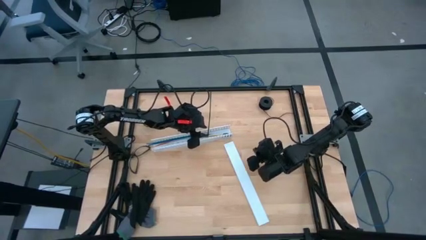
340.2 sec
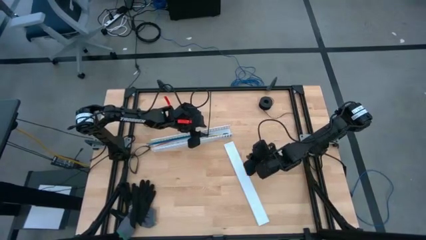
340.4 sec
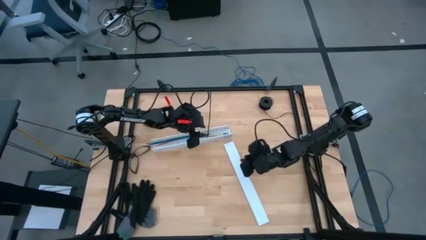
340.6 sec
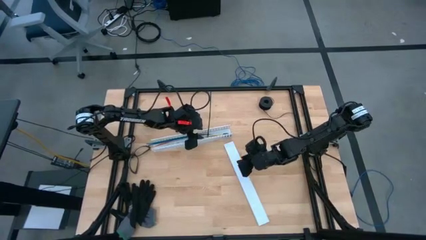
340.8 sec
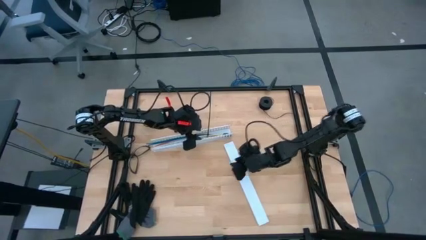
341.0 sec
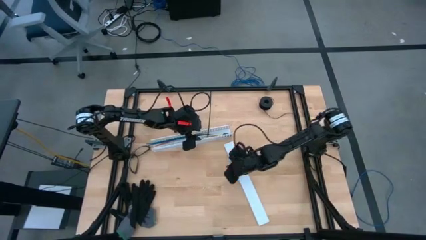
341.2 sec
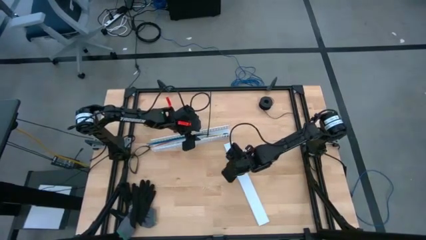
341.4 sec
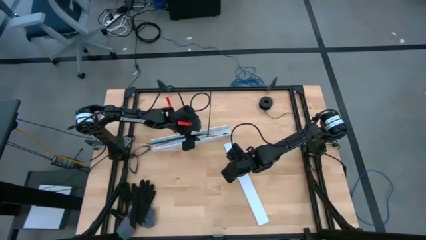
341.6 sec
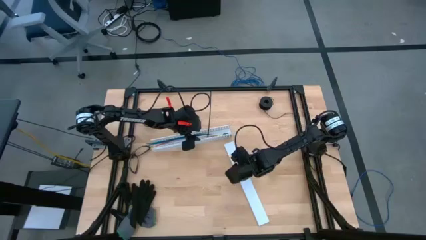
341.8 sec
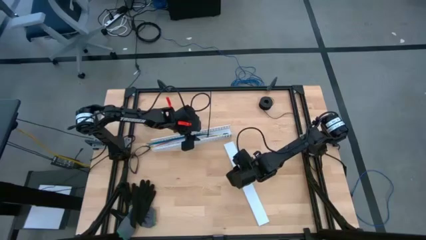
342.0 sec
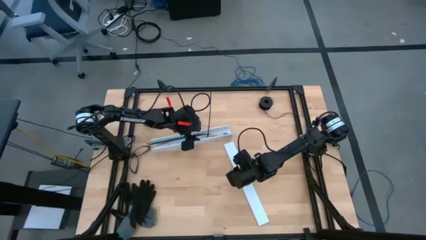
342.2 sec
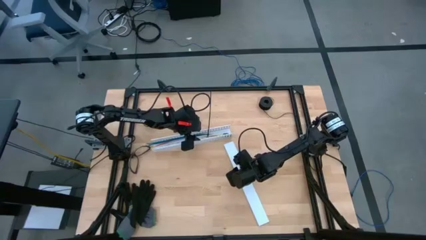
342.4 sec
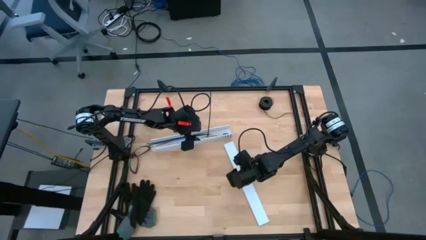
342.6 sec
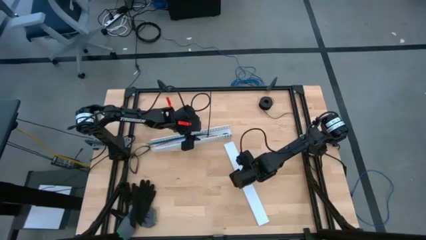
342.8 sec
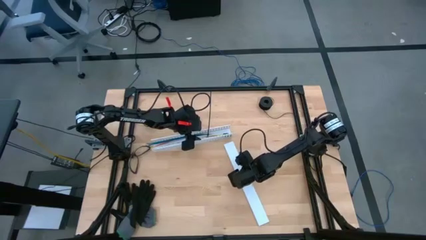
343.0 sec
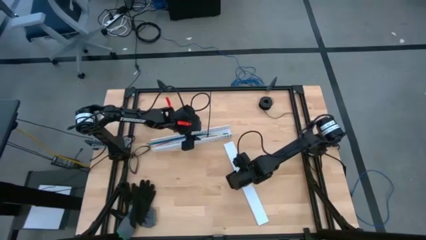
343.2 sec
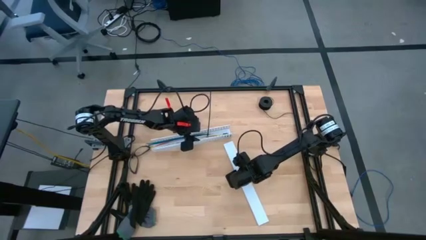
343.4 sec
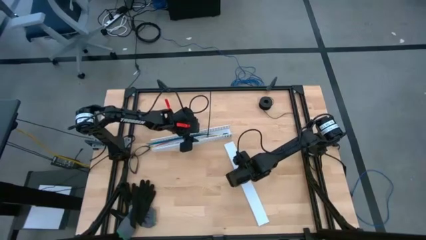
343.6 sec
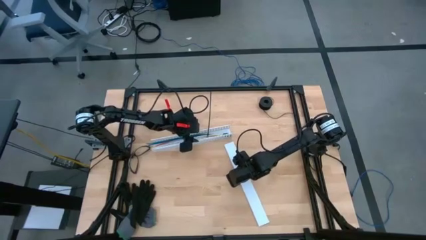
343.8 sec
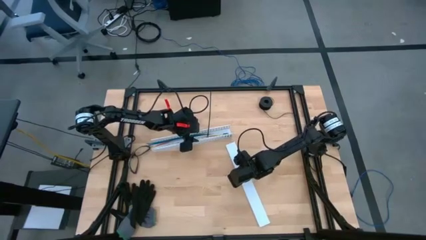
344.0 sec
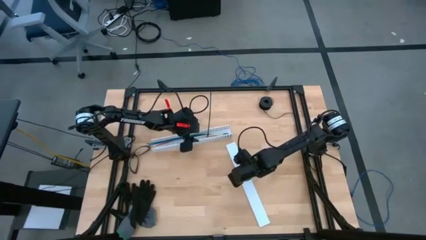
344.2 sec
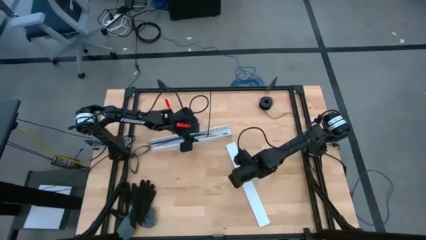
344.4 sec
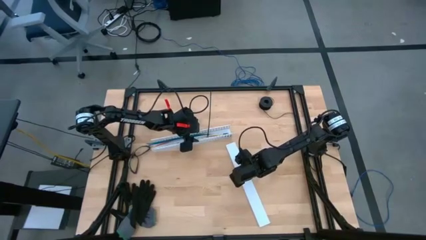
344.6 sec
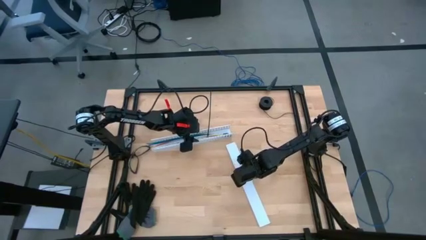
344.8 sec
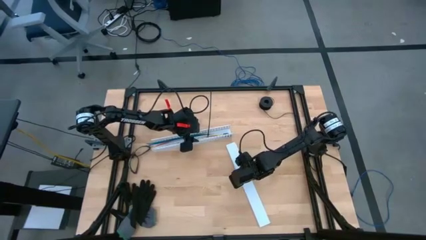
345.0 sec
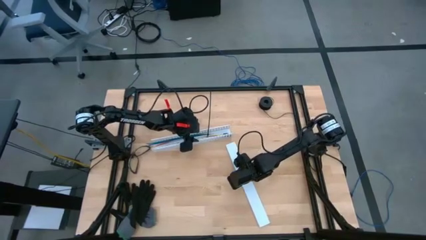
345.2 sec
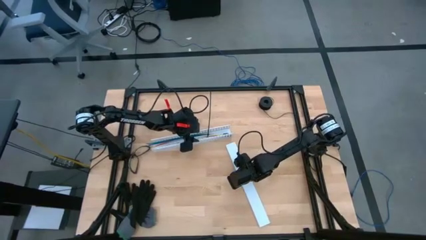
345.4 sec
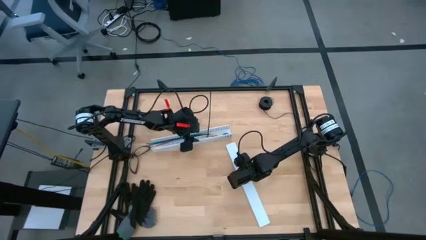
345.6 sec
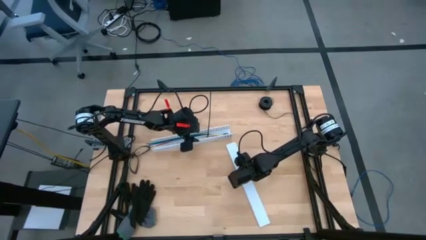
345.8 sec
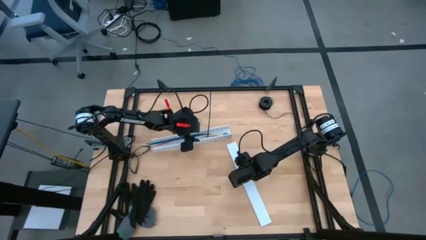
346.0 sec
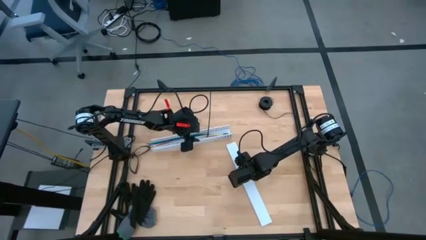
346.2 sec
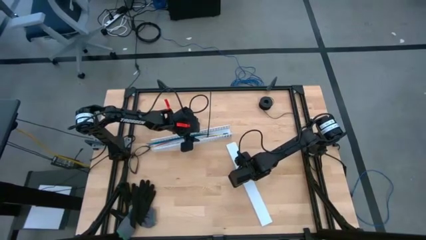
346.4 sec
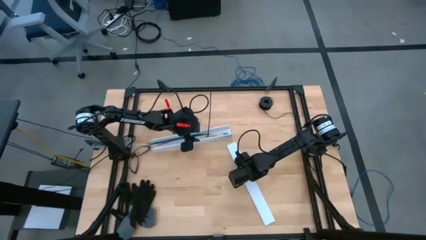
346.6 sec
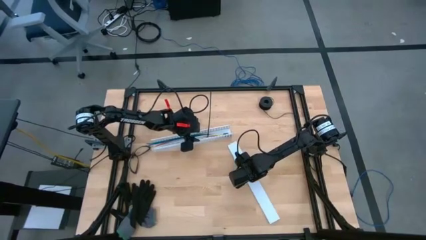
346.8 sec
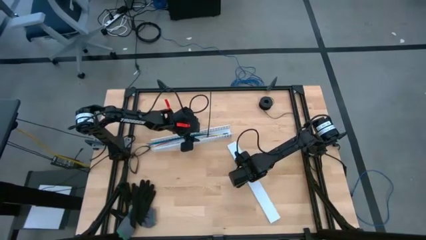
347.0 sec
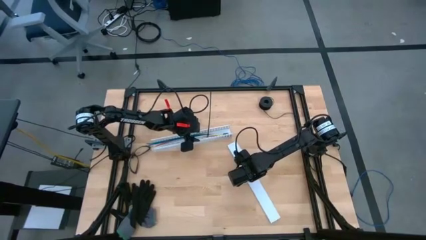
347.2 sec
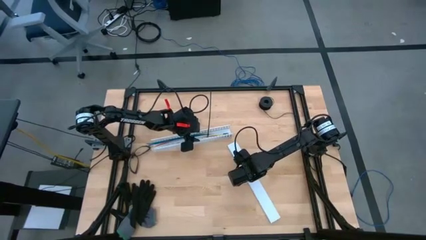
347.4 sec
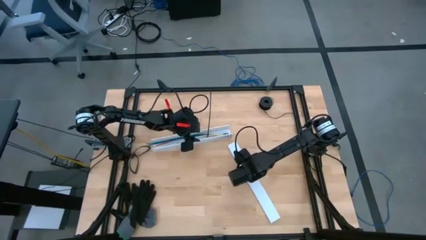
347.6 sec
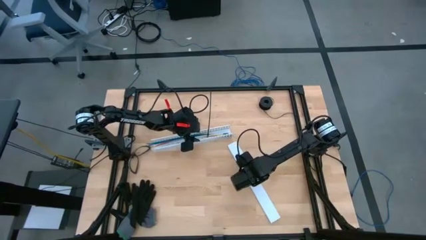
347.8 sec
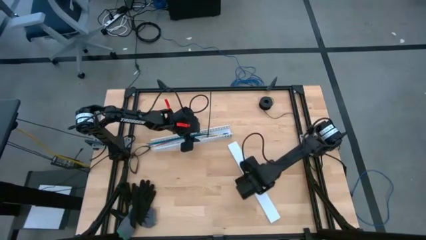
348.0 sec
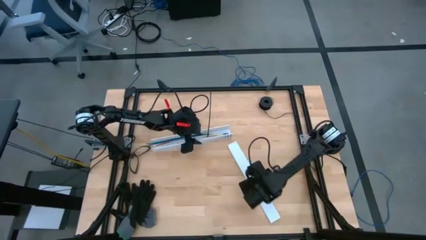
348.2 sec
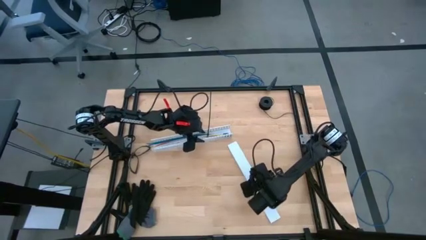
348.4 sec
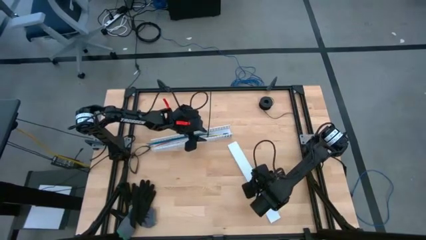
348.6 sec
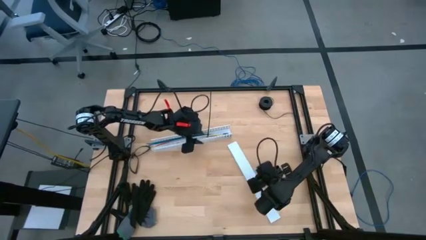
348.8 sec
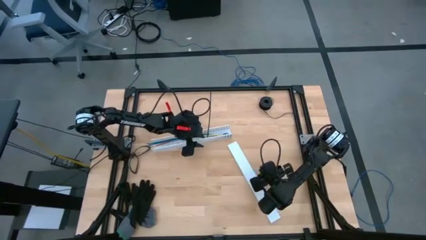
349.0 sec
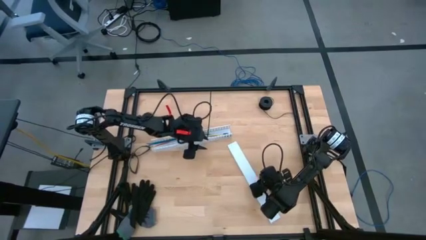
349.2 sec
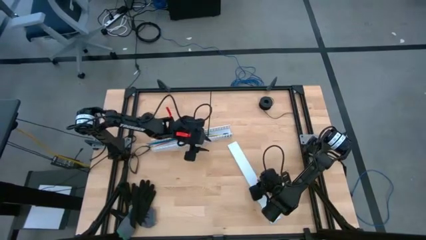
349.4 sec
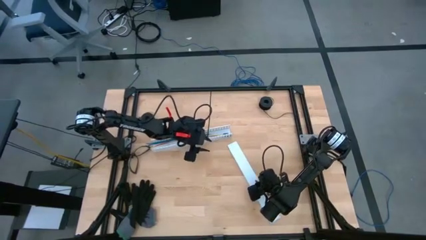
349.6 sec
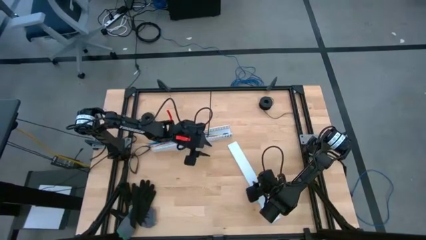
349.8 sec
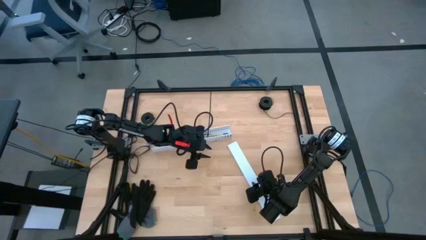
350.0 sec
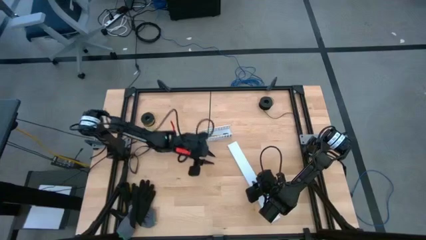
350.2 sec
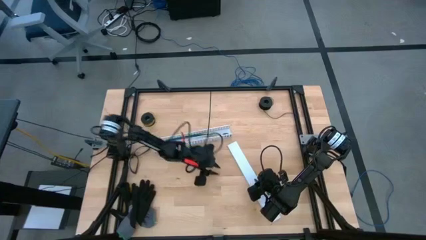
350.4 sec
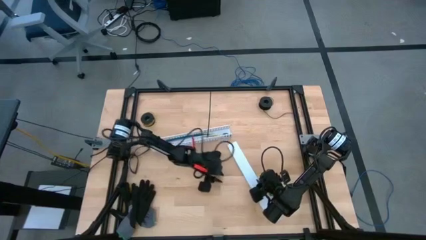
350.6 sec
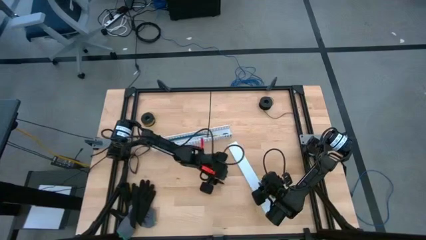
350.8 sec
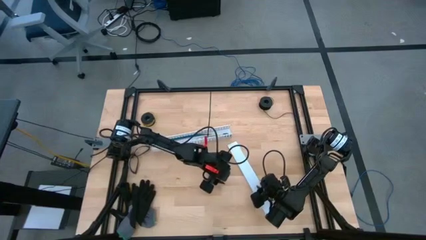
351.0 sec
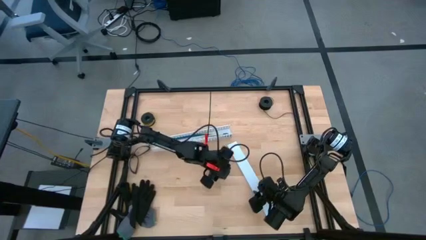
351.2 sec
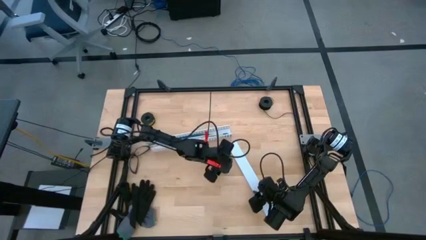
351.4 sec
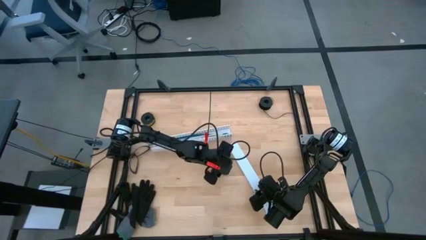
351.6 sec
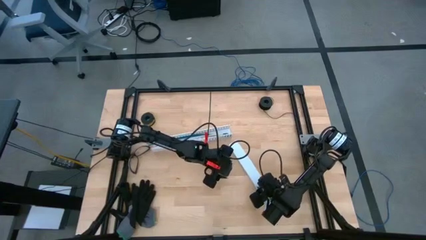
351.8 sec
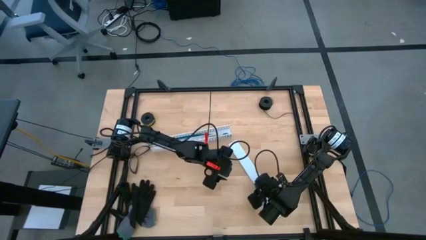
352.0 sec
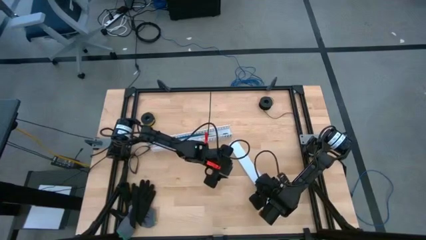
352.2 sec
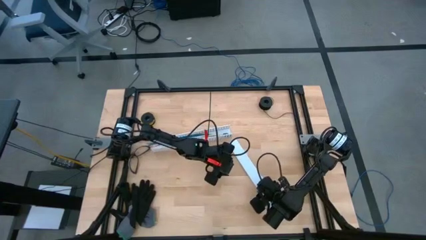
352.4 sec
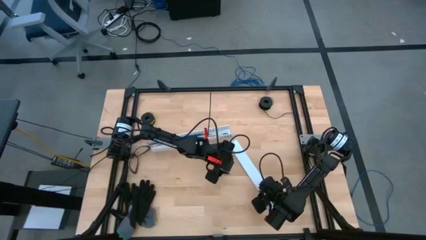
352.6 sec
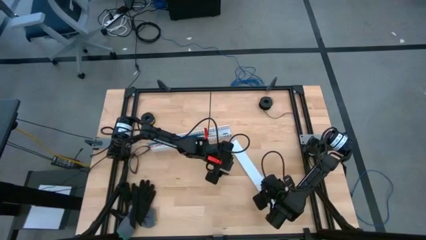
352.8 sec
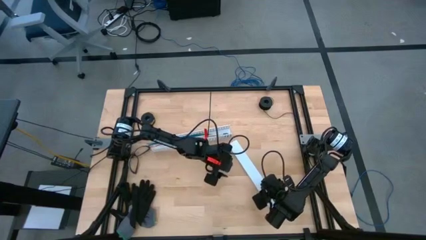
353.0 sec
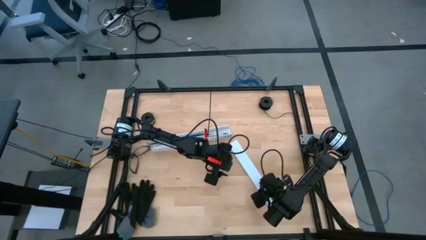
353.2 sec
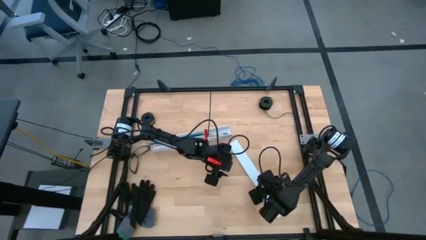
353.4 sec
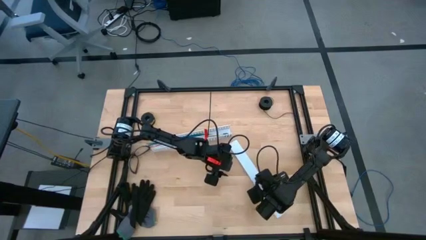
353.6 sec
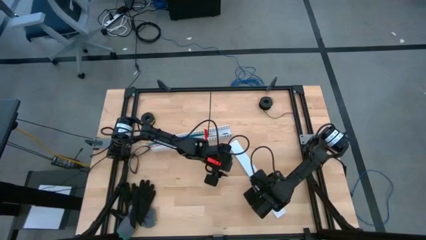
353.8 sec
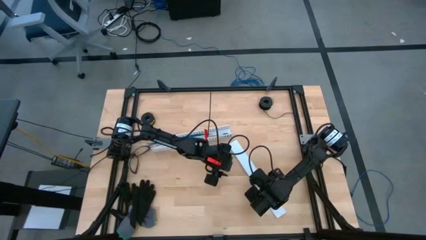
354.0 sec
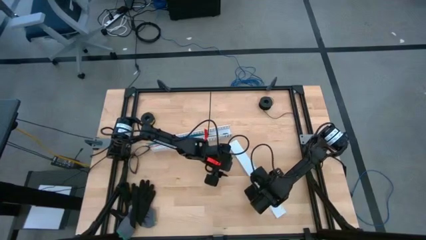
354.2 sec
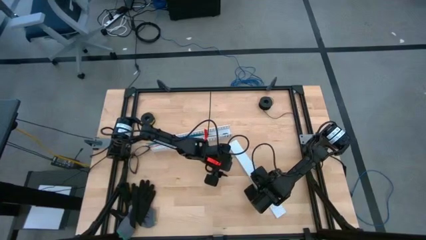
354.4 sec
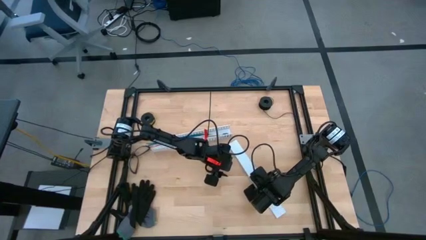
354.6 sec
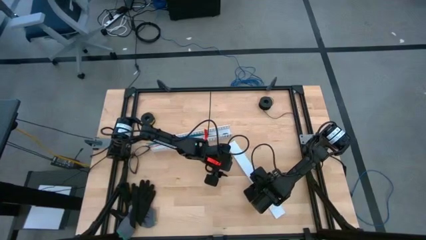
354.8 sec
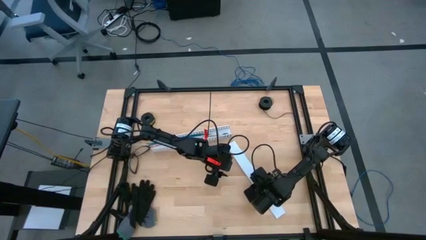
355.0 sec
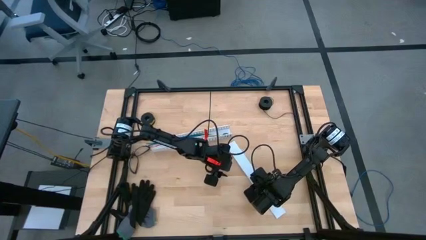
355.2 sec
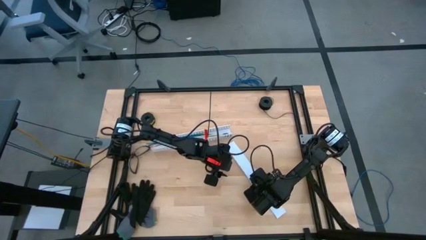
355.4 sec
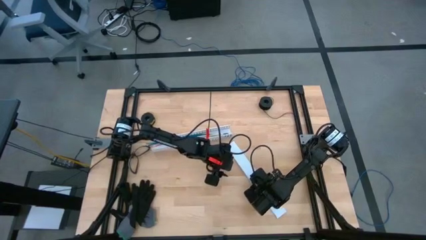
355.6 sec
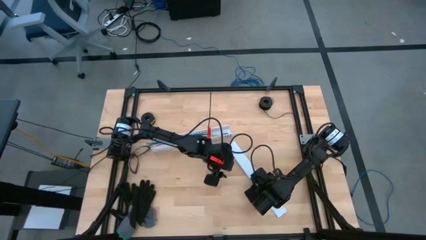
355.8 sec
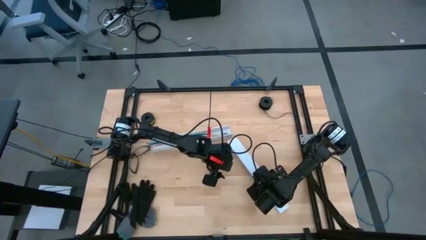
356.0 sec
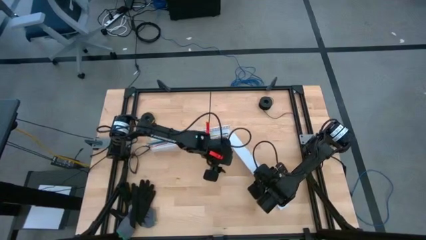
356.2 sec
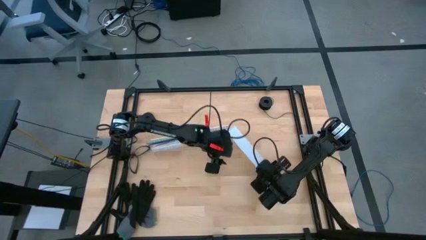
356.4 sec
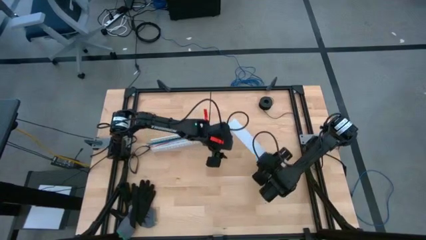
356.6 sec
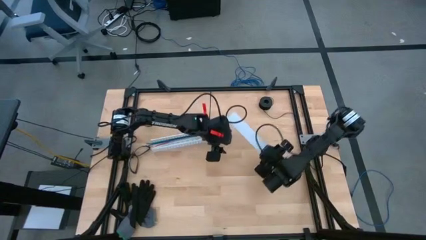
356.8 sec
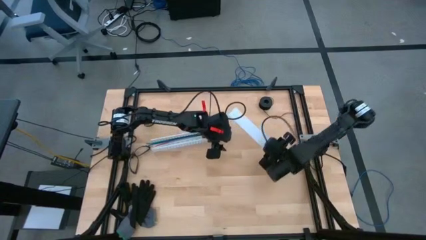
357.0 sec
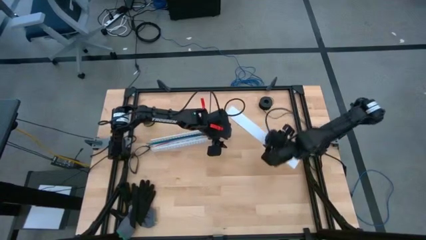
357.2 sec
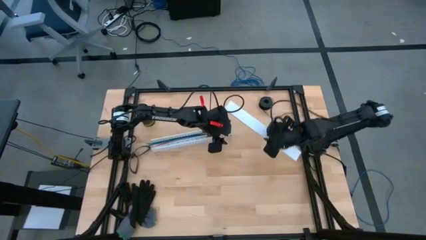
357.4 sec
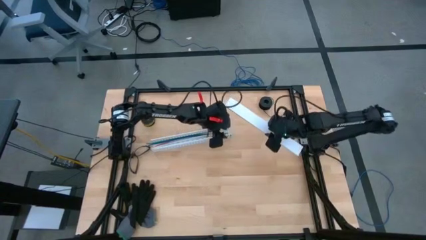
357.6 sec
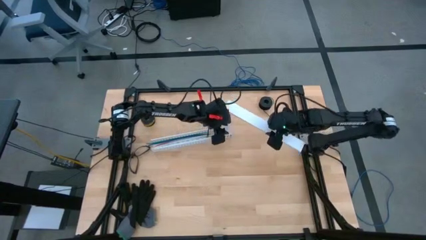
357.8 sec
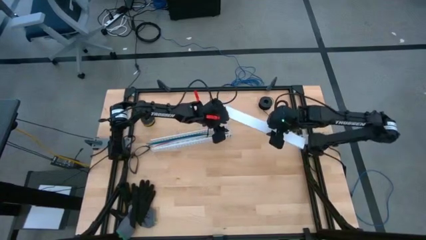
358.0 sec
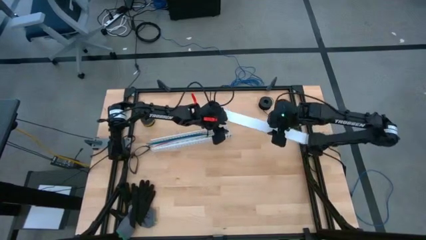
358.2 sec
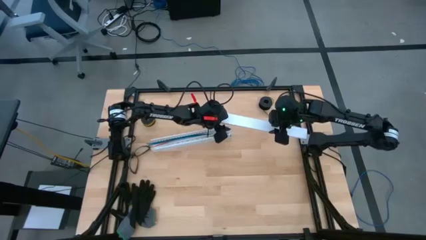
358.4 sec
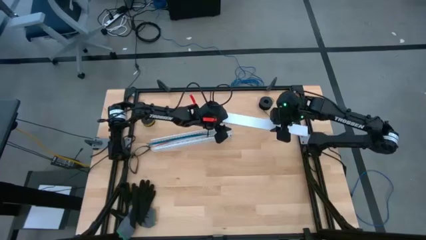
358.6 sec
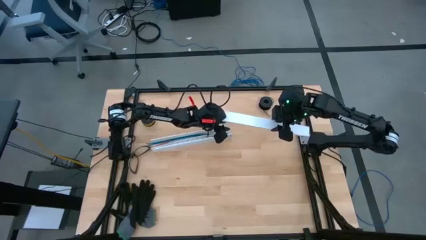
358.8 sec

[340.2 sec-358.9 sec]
Task: Ziptie cables
Close the white cable duct
